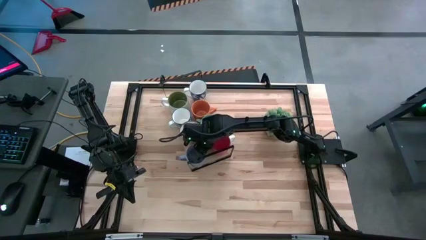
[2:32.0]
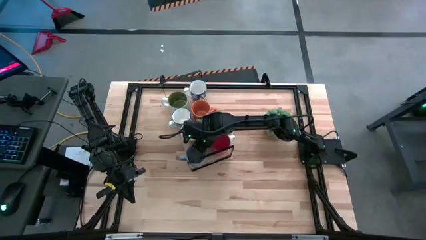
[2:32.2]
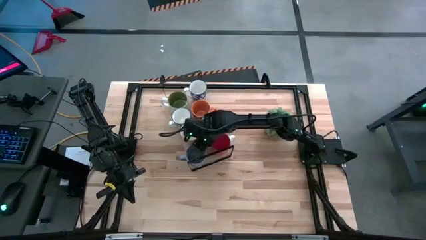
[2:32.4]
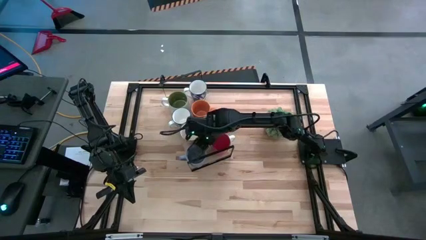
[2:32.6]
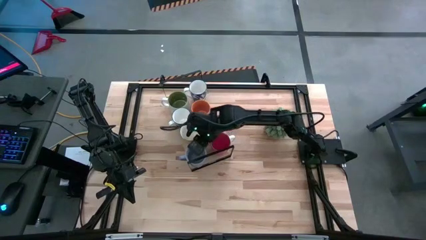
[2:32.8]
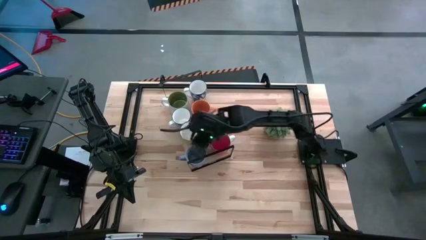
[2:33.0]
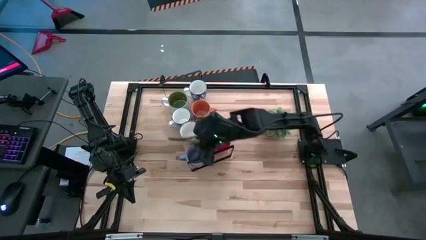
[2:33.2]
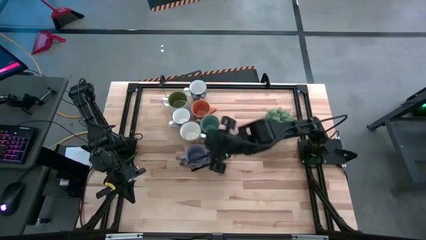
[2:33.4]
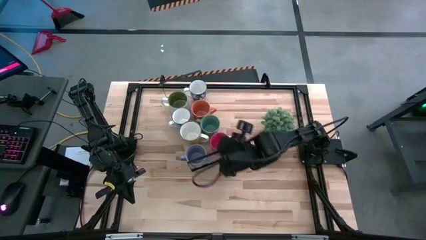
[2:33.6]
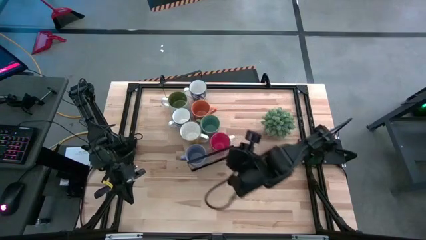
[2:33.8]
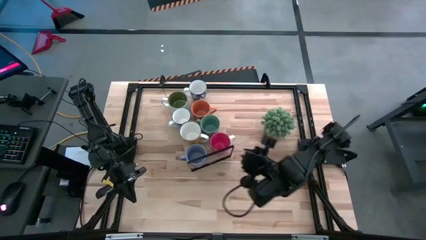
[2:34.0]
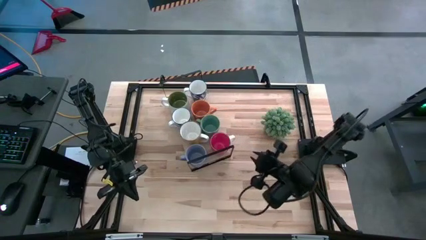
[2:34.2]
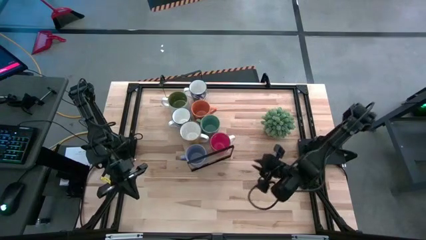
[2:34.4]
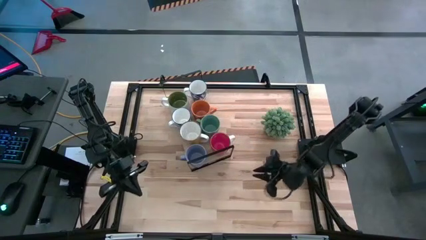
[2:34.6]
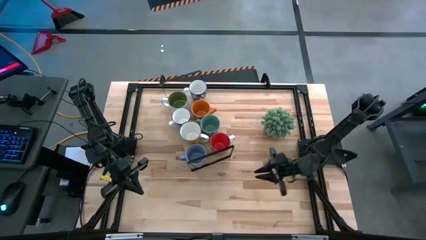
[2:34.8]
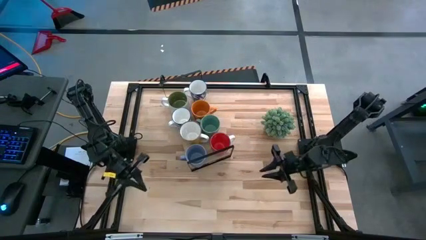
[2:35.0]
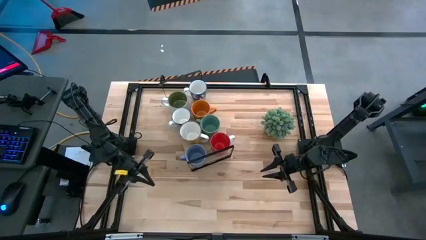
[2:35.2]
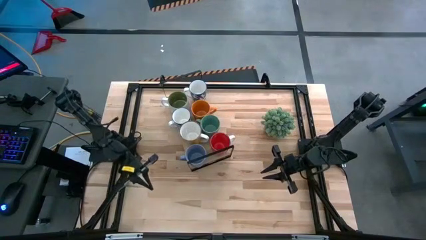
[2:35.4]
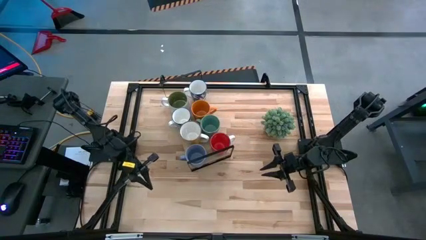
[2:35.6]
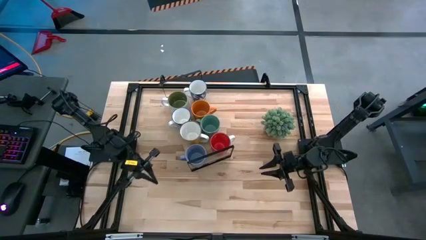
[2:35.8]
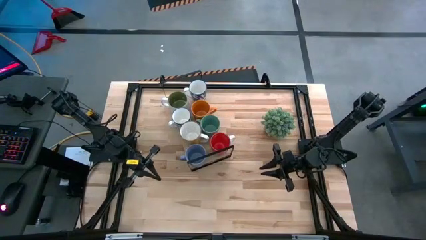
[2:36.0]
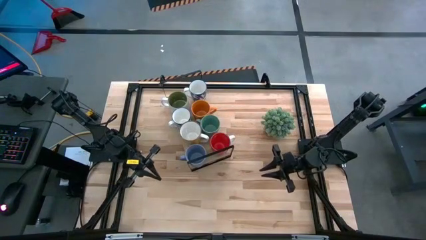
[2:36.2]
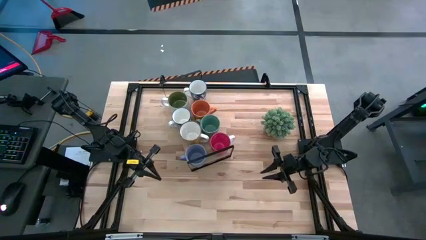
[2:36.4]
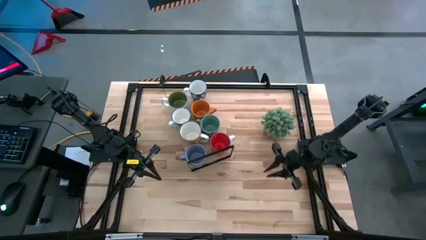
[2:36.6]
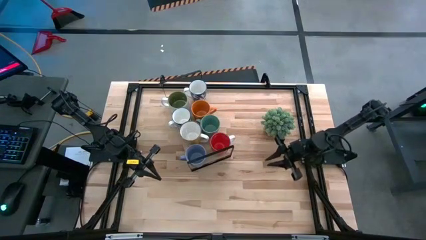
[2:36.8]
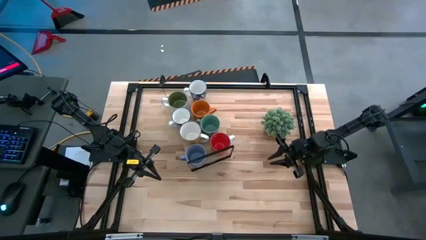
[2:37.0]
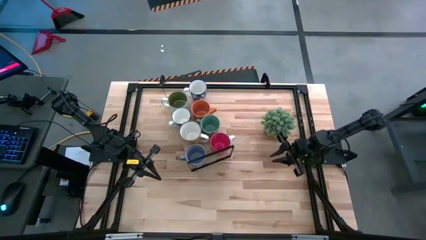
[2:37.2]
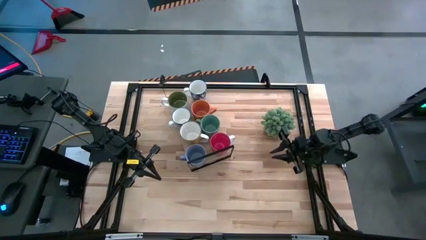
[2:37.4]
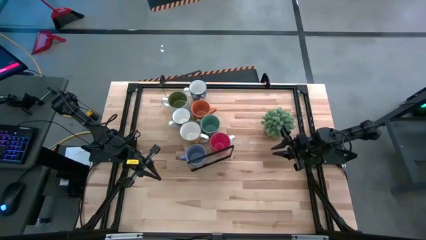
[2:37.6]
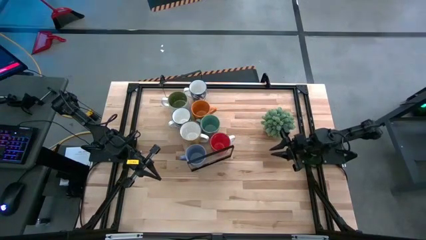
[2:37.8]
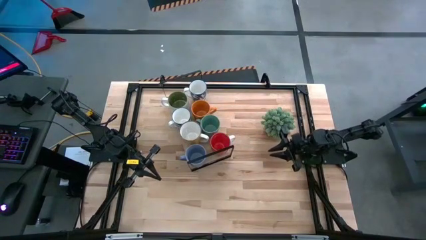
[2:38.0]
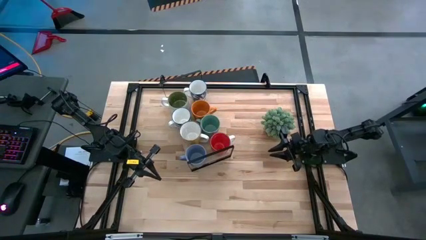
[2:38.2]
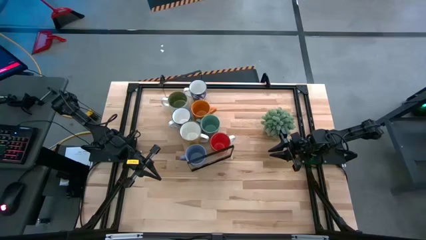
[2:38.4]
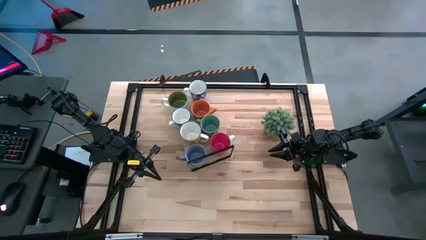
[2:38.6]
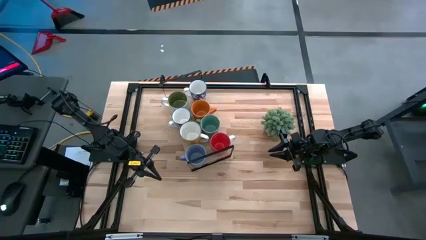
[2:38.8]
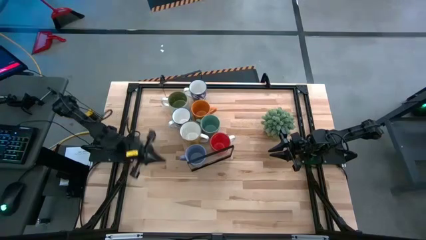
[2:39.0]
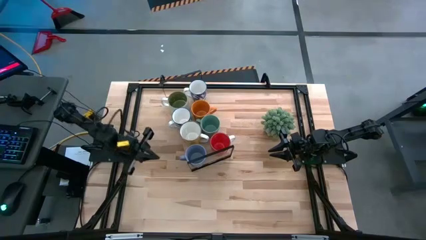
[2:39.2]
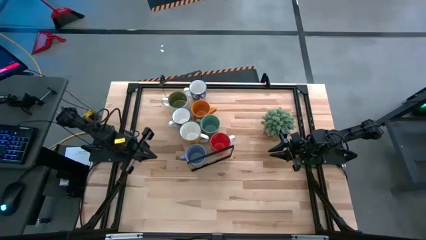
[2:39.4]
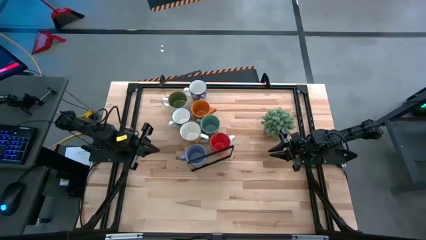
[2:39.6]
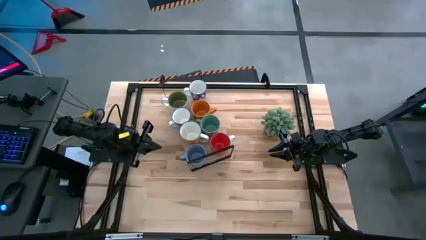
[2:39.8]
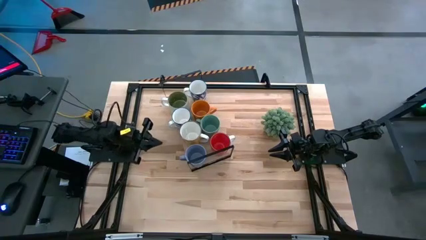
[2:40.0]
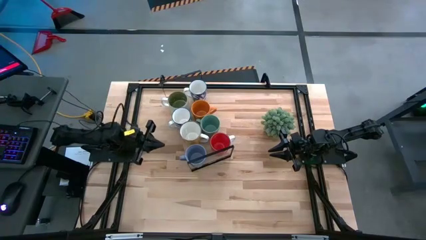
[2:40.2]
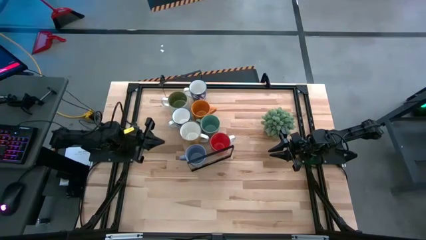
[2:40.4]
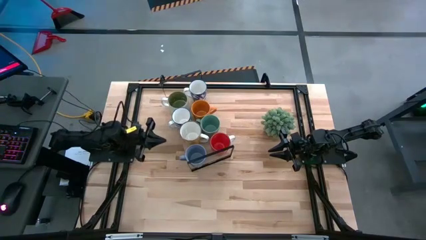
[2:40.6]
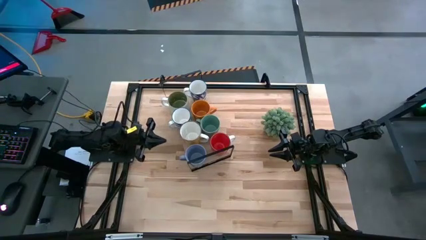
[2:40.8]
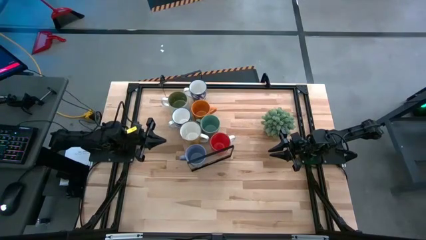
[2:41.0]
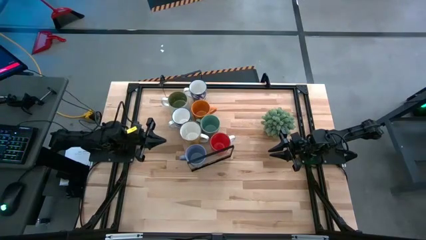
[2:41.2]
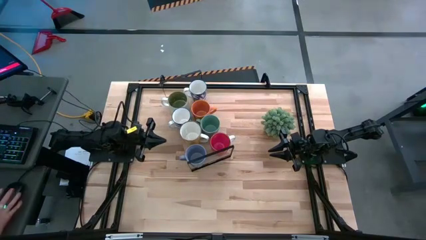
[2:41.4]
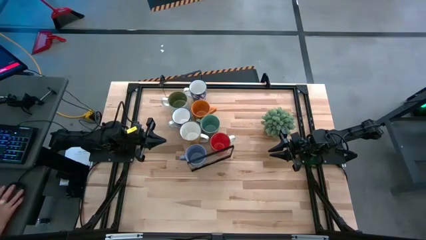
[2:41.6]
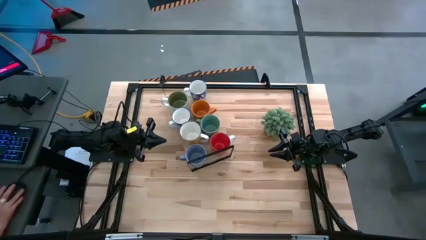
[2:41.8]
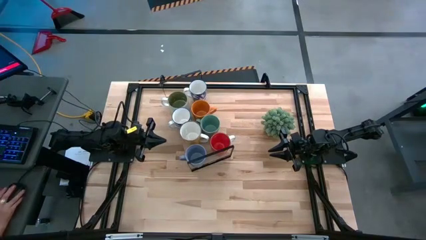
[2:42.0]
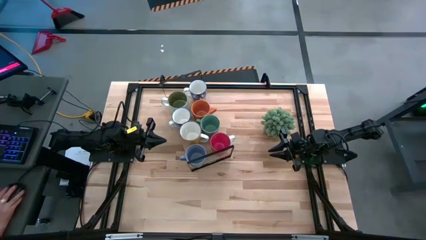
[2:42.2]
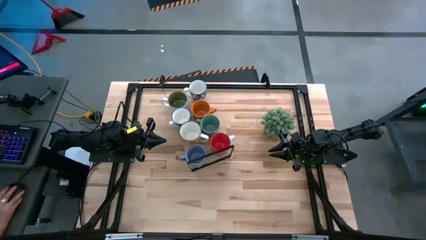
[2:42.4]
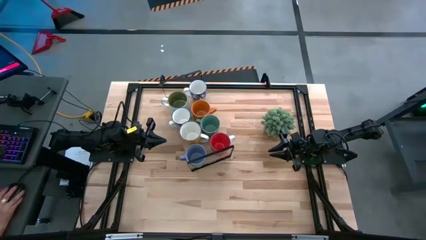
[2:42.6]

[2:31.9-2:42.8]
Task: Place coffee mugs
Return to home position
